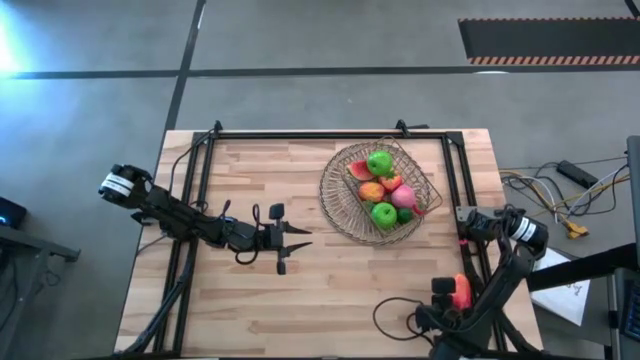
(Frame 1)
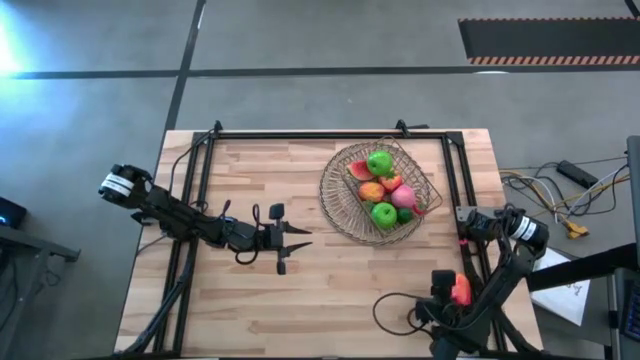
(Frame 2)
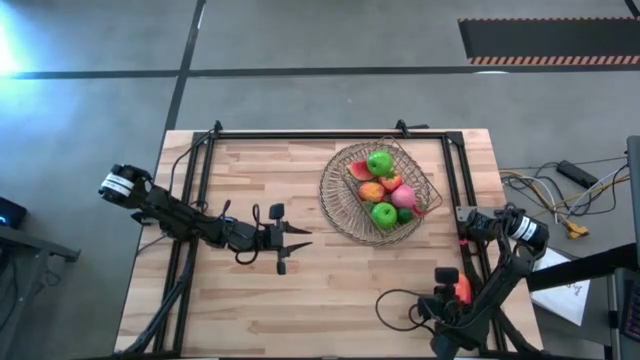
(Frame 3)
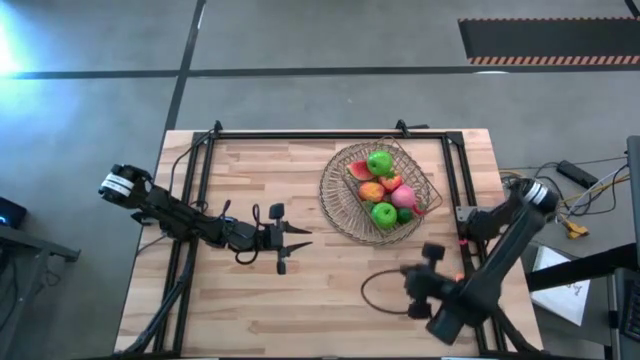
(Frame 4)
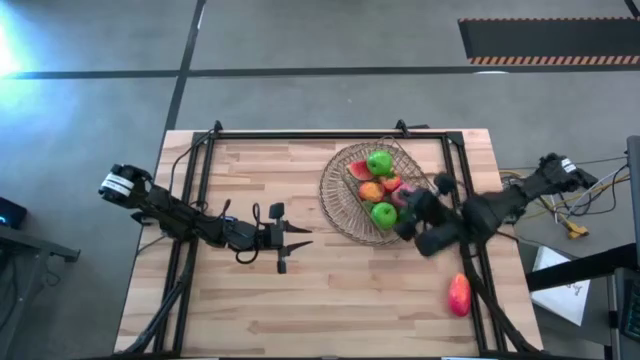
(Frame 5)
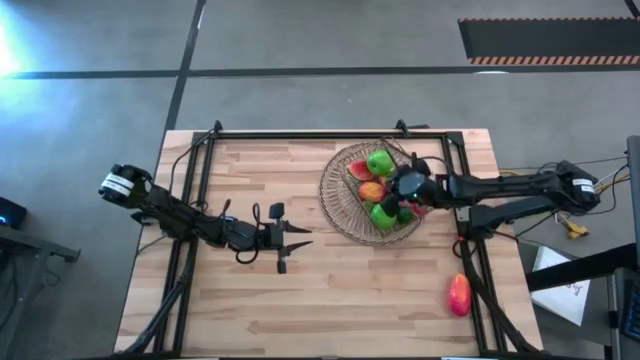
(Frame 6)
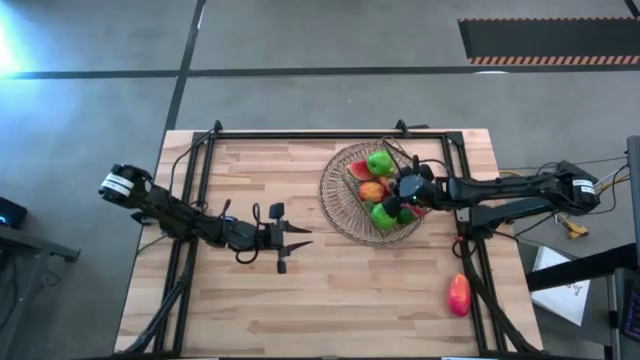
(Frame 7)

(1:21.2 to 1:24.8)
Task: Build produce basket
Put the red strawberry into the gold mesh basket

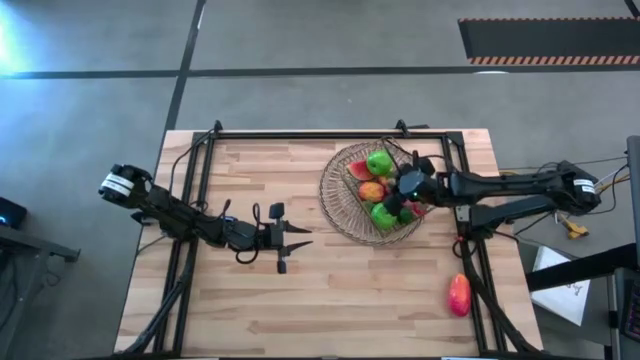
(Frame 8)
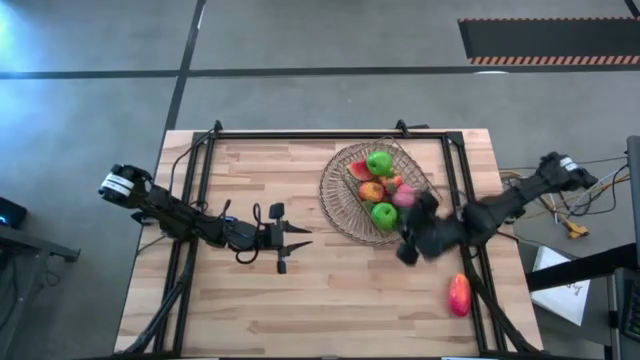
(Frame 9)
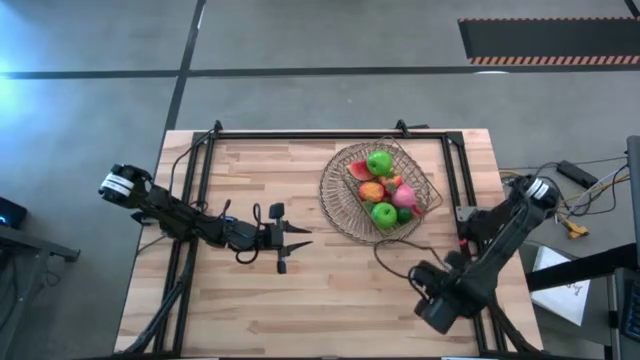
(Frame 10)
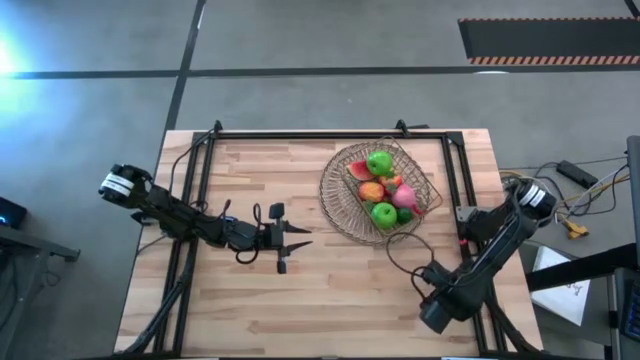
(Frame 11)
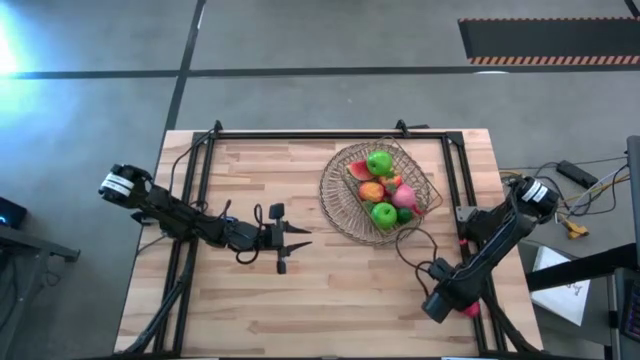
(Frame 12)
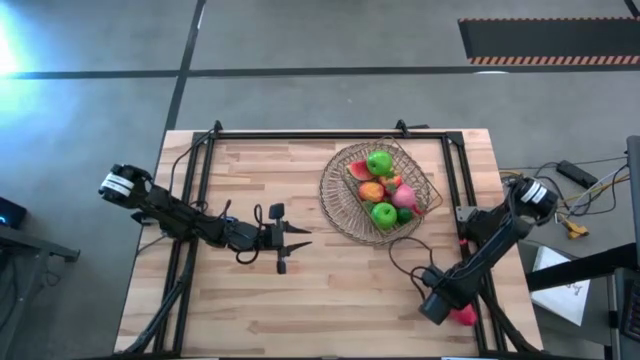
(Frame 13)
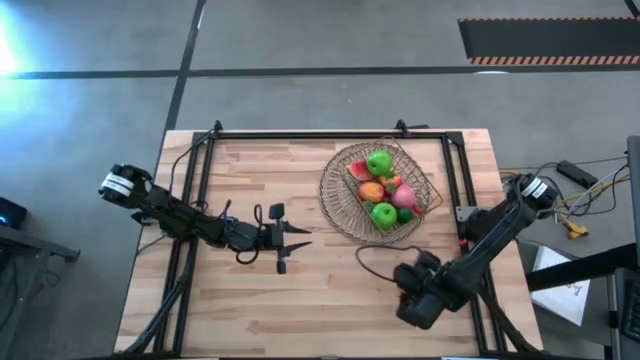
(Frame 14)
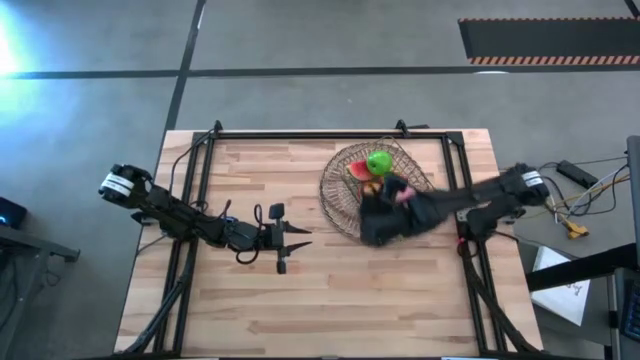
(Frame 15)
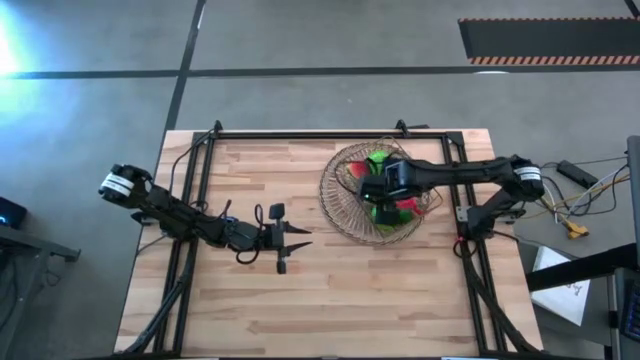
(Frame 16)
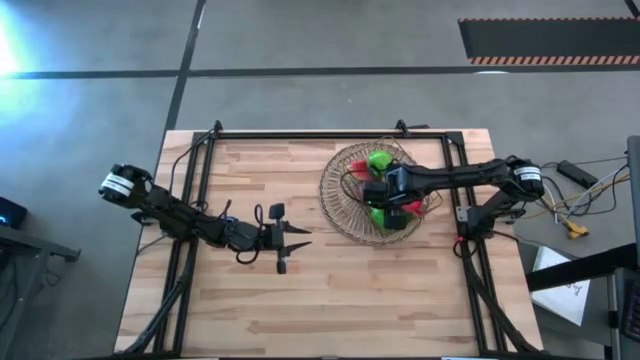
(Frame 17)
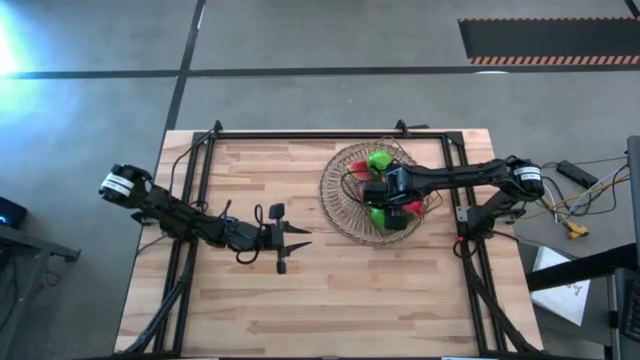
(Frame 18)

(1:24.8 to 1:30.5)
Put the orange mango into the gold mesh basket

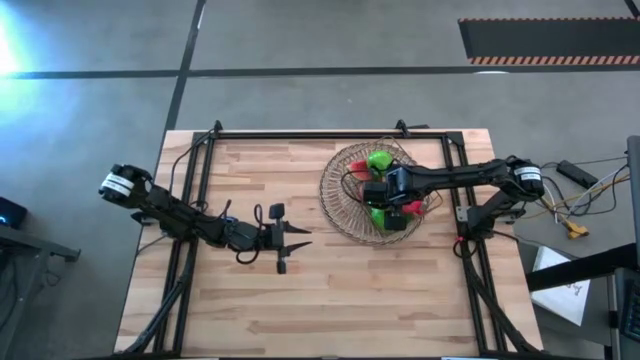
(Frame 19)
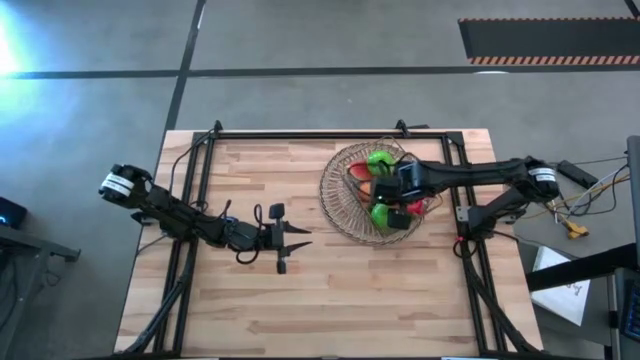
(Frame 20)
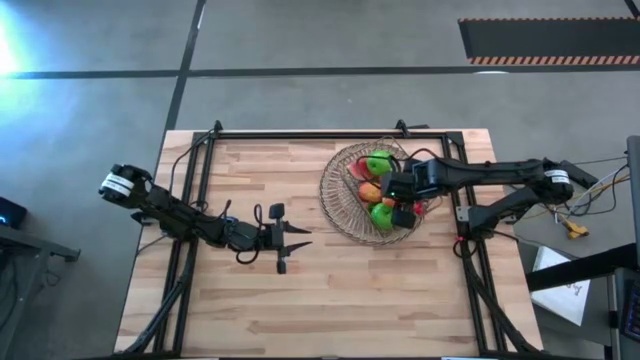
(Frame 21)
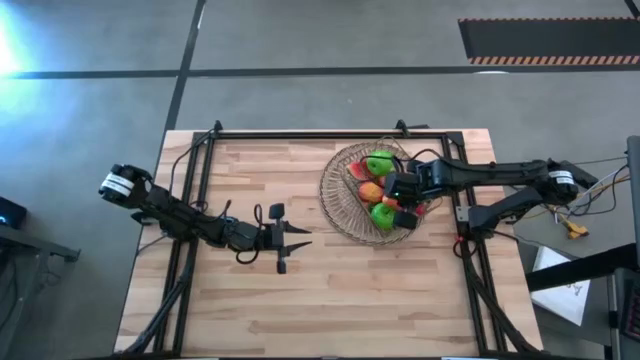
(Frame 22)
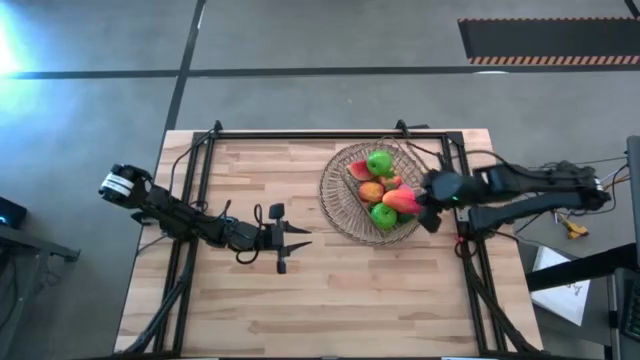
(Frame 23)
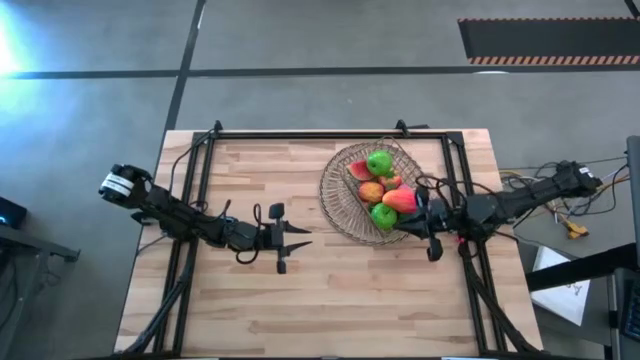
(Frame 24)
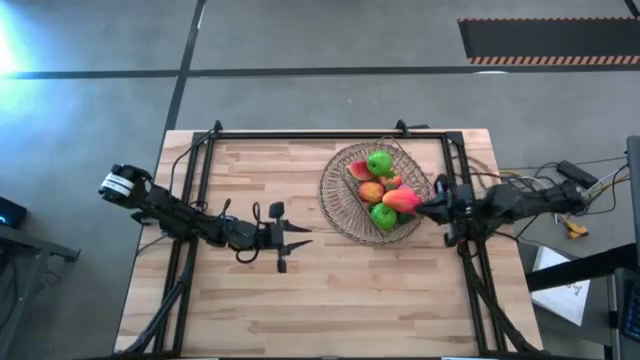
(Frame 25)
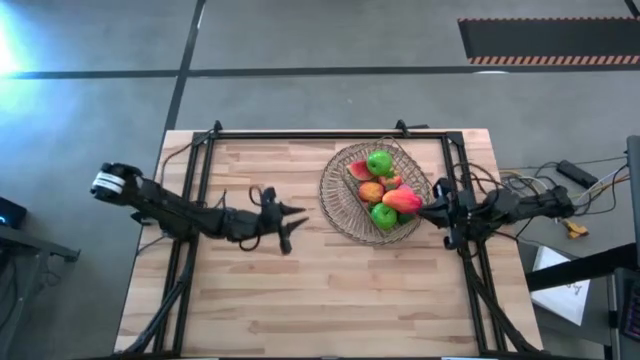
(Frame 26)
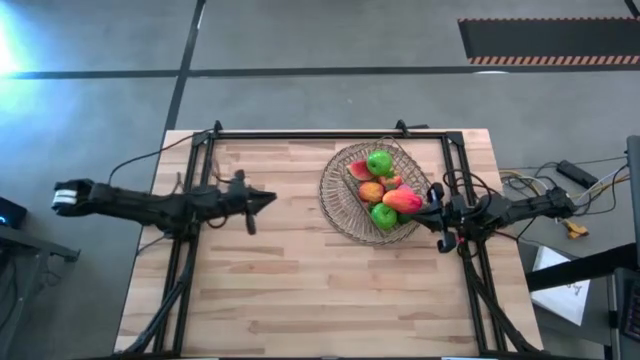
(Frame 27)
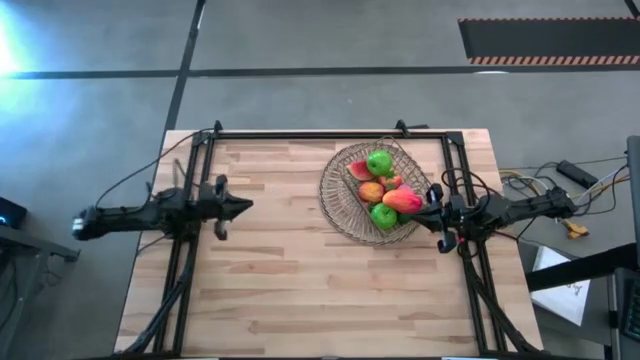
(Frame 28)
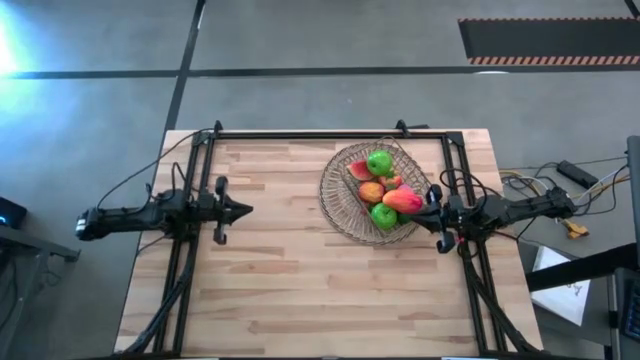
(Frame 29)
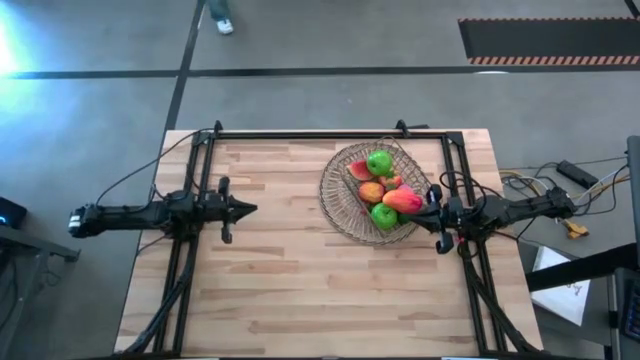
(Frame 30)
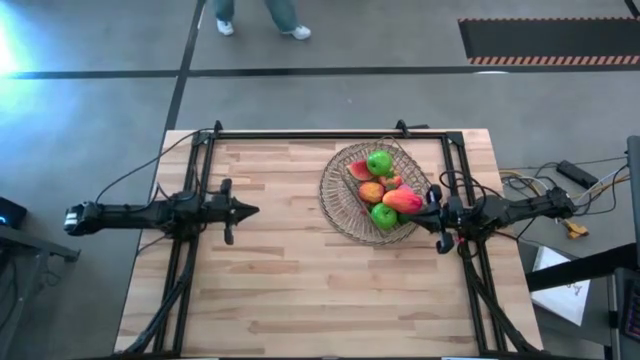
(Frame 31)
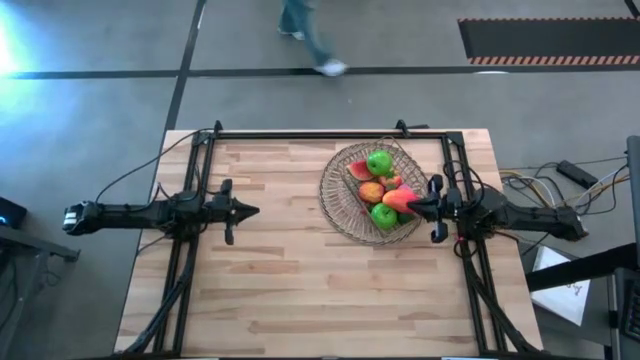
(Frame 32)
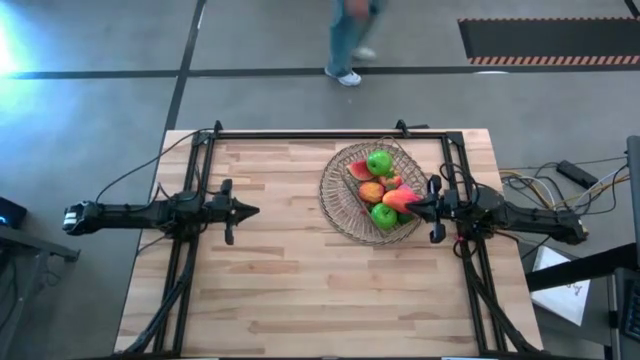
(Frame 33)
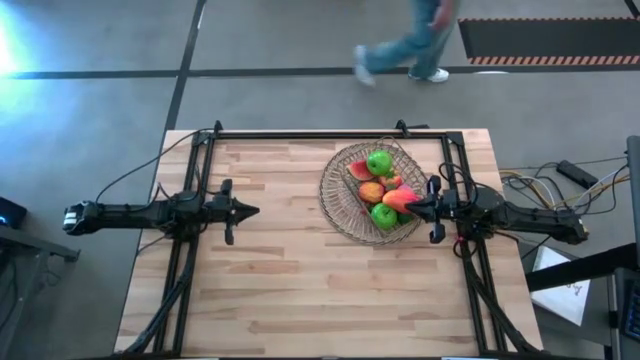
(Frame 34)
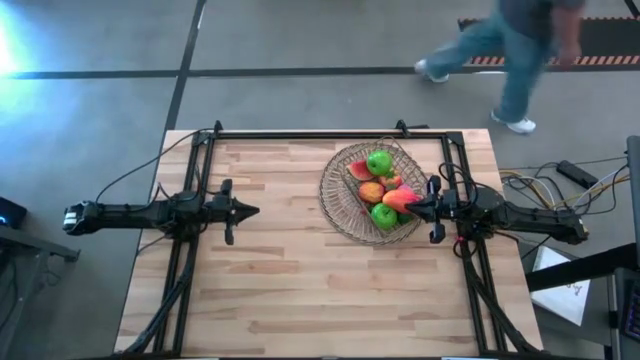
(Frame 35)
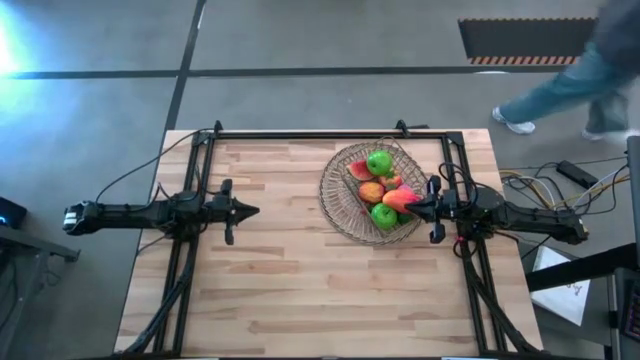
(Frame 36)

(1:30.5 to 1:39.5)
Return to Home Position

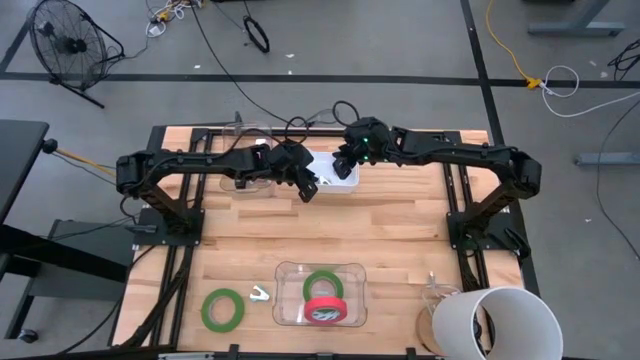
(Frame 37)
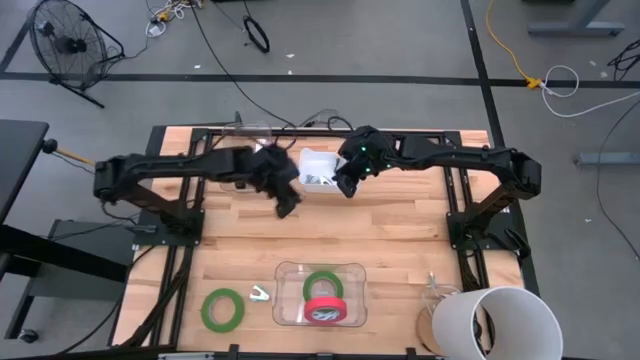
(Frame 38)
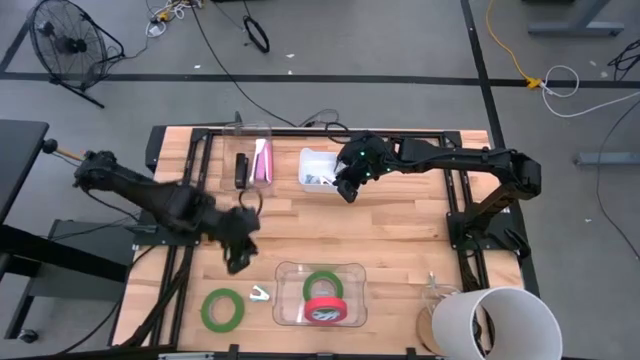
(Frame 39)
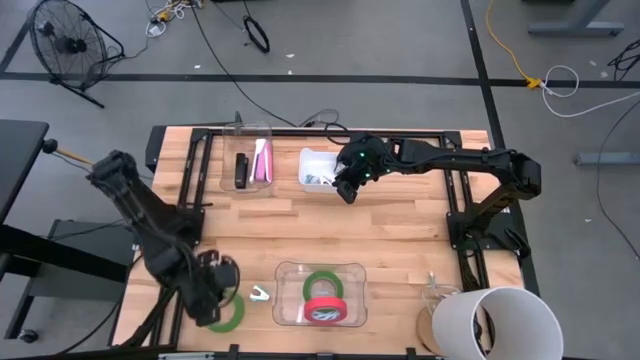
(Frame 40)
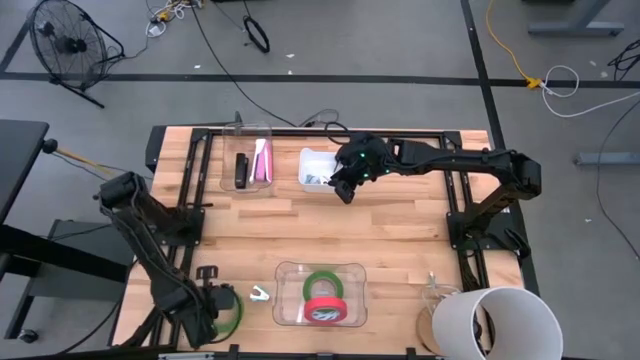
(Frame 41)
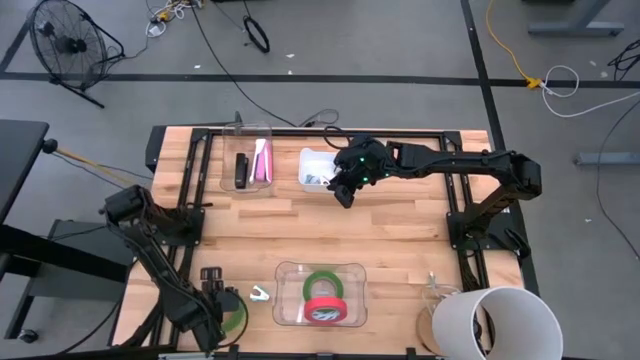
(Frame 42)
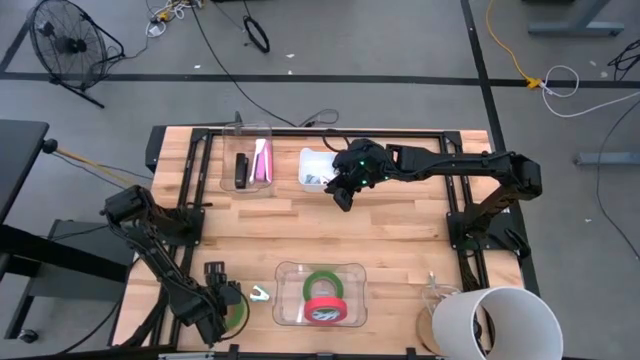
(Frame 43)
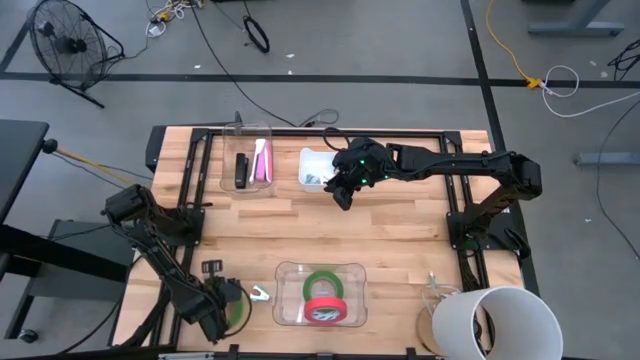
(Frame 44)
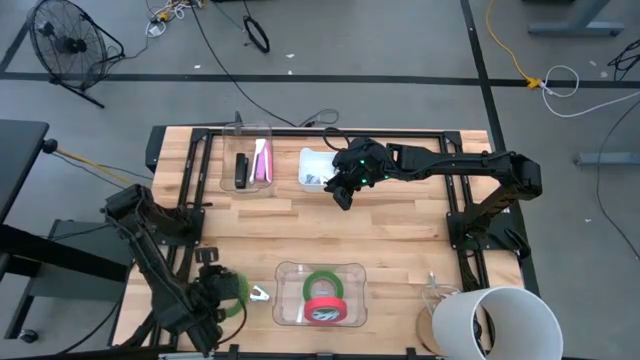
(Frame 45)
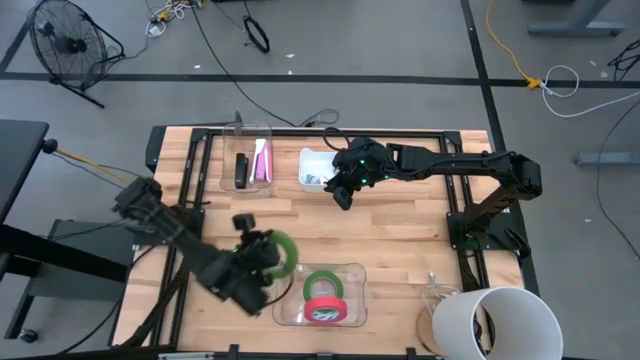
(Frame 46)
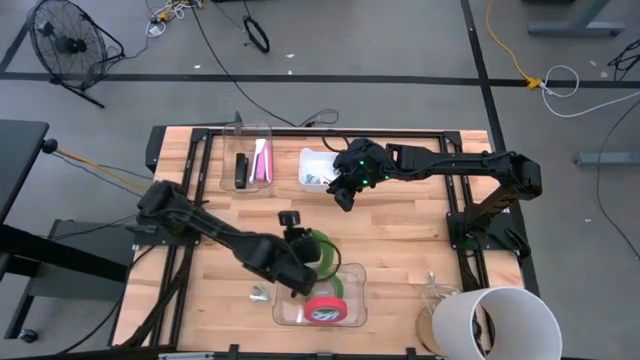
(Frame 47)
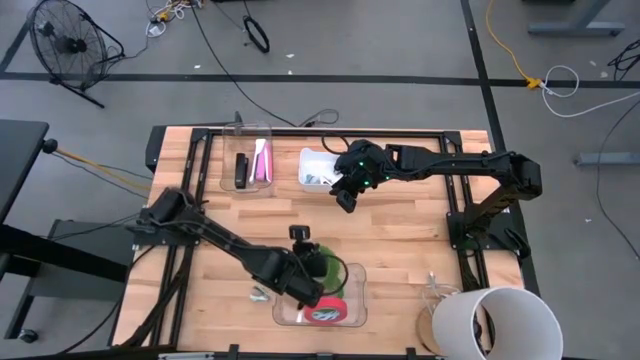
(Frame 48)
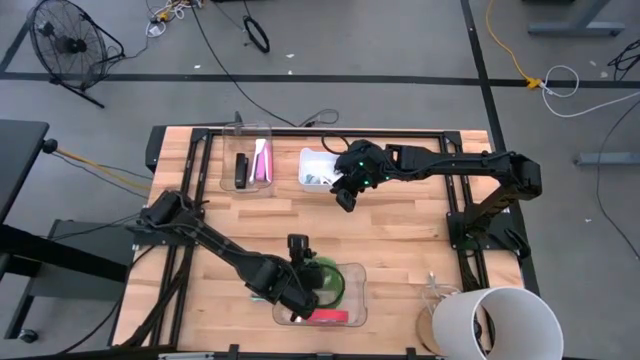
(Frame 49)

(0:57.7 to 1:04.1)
Task: Pick and place Stapler, Stapler remover, tape
Put the green tape into the bottom transparent bin
